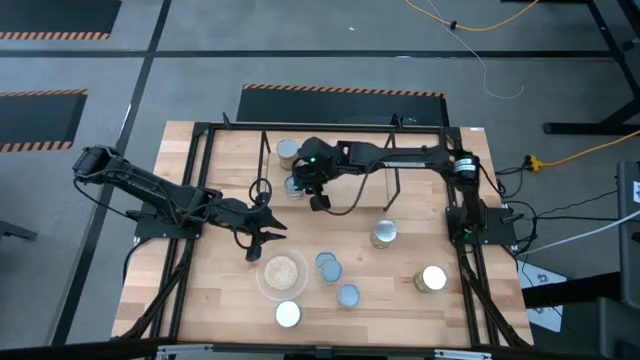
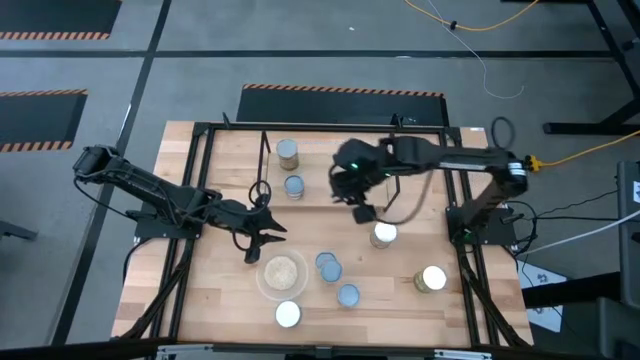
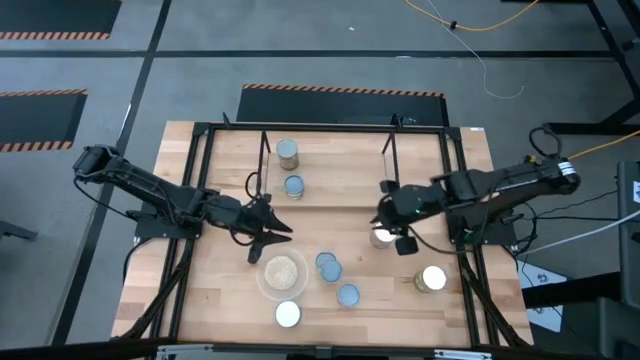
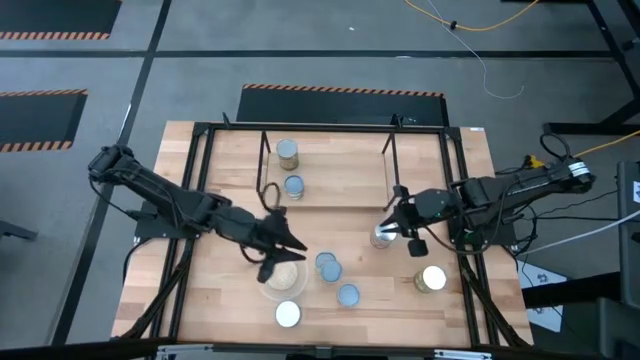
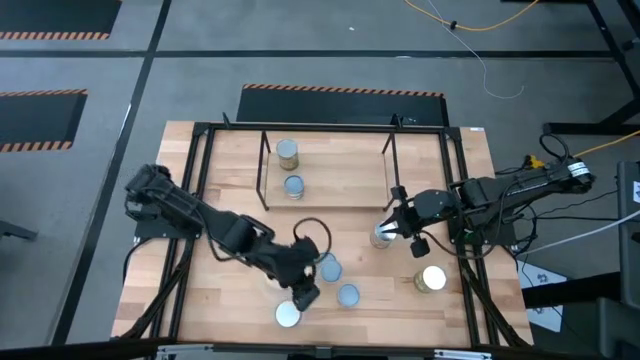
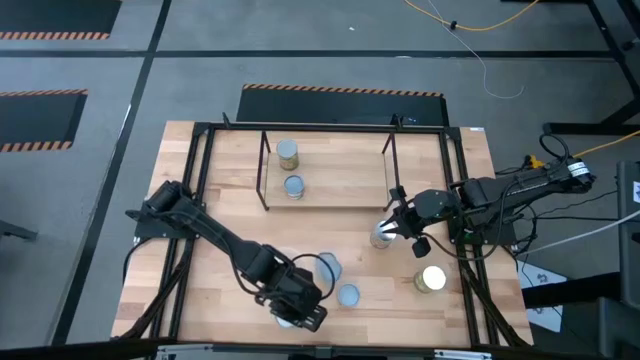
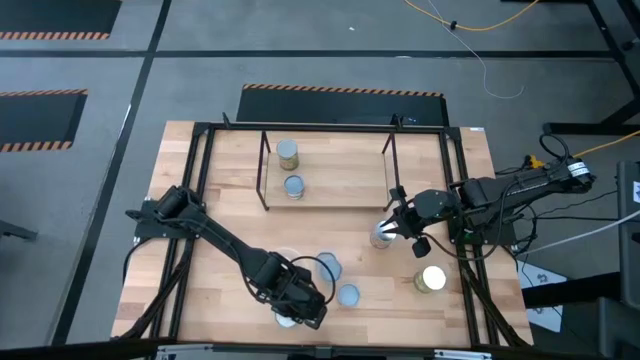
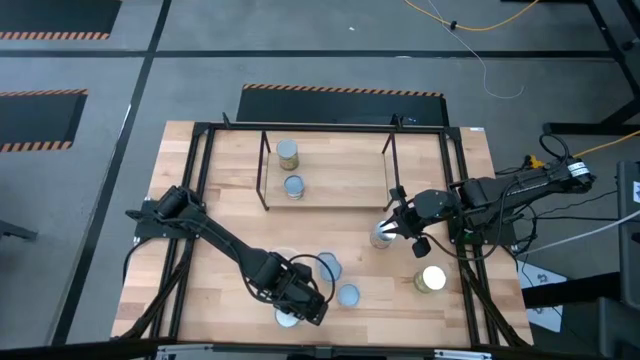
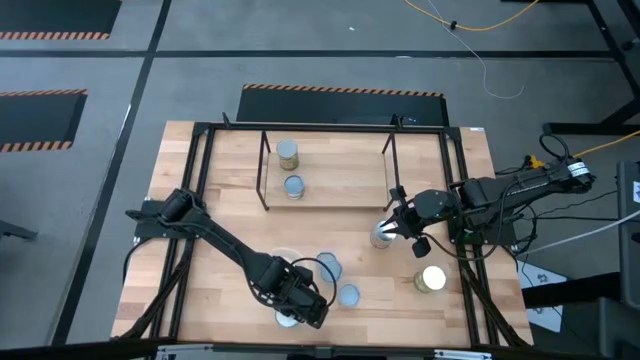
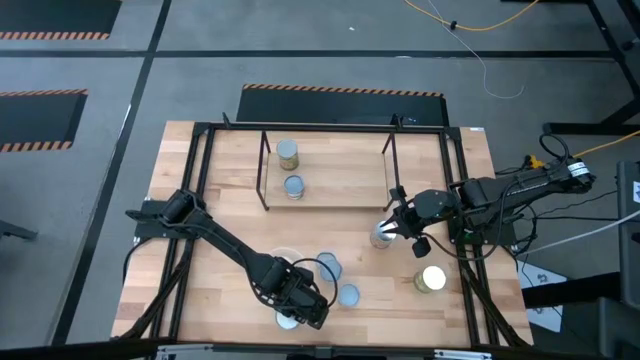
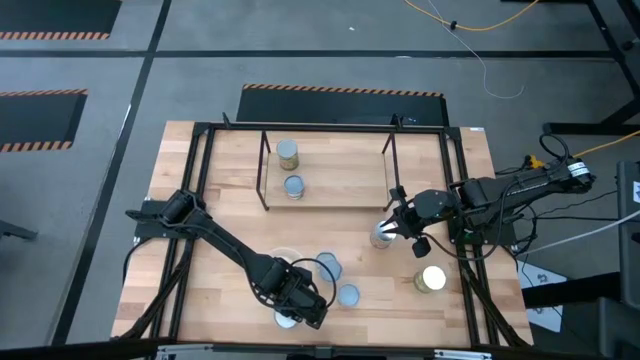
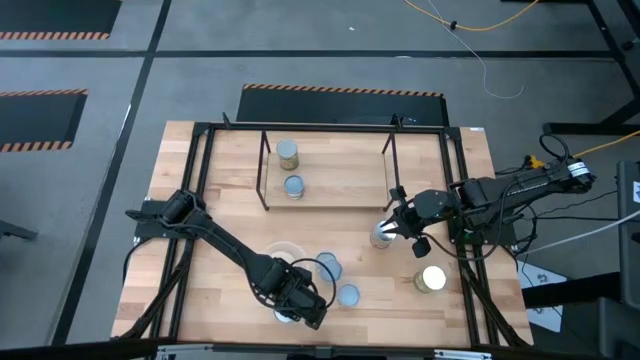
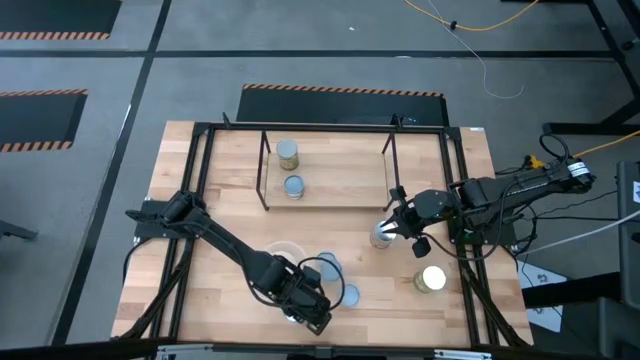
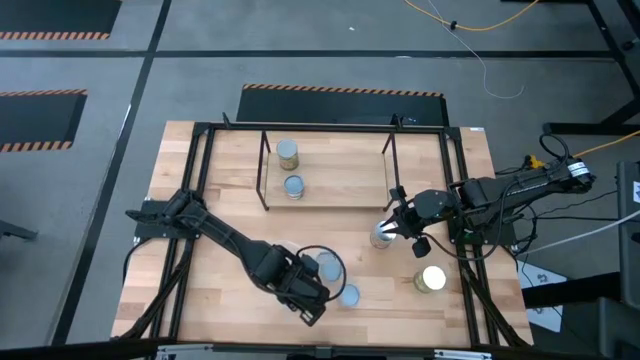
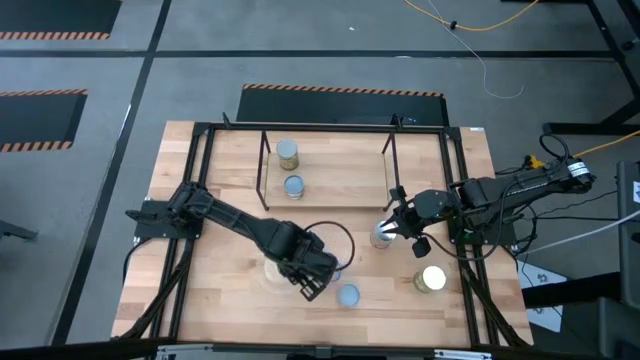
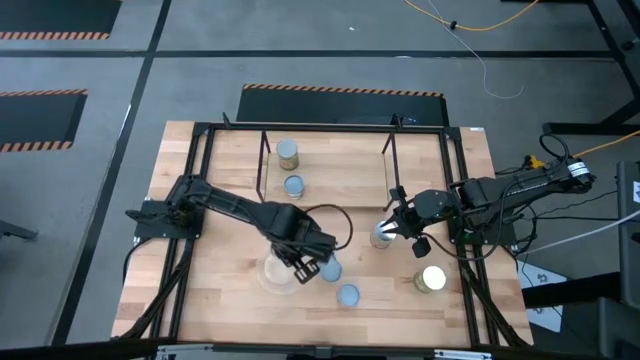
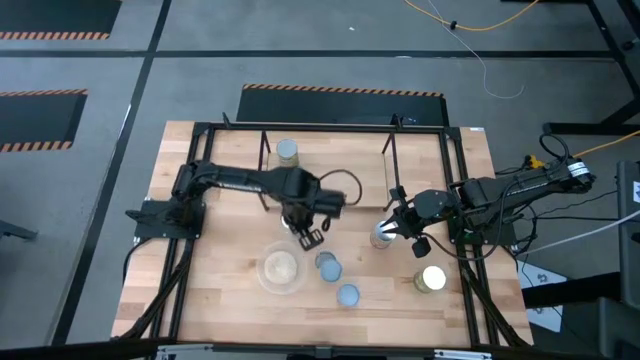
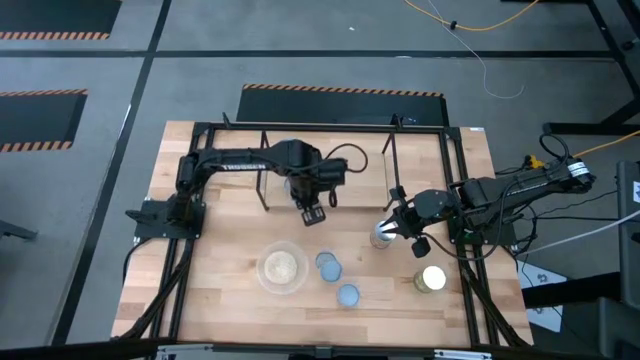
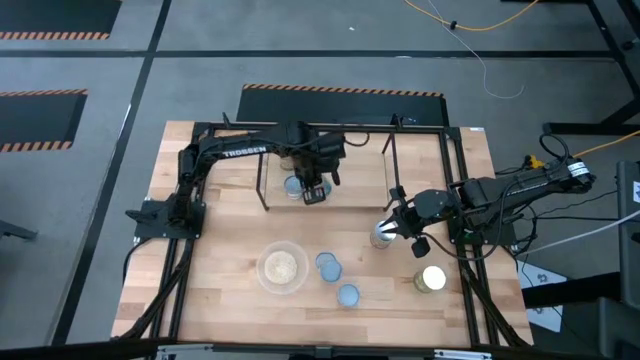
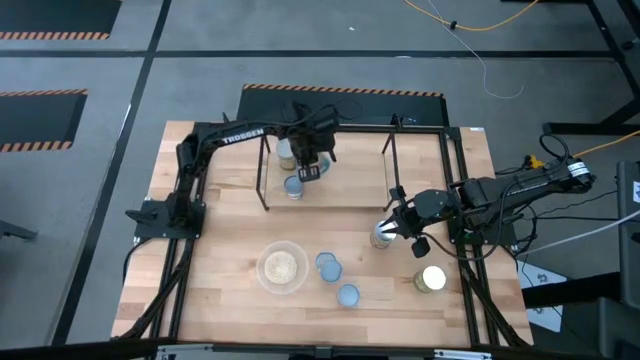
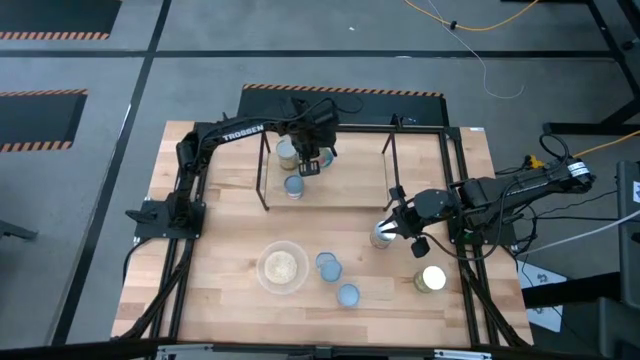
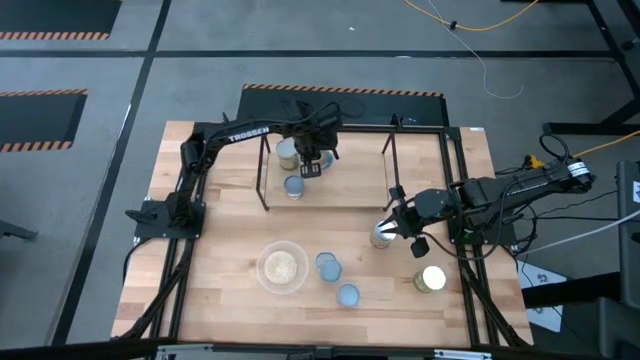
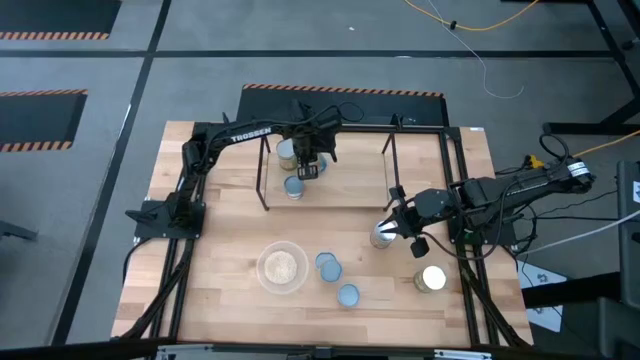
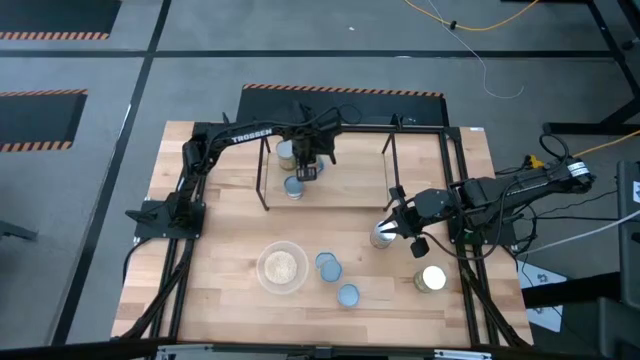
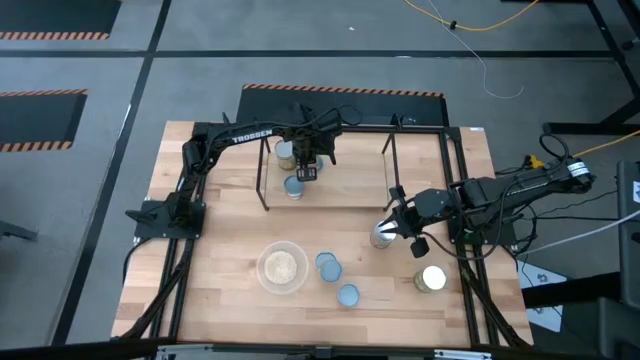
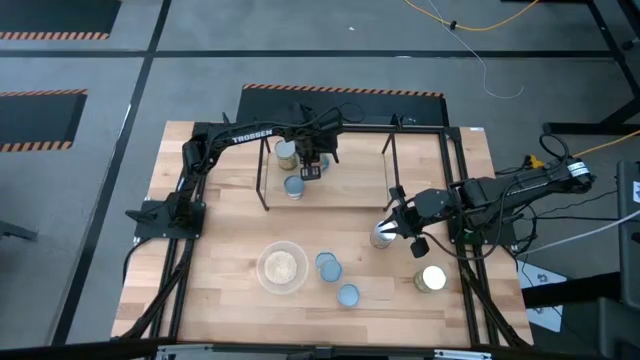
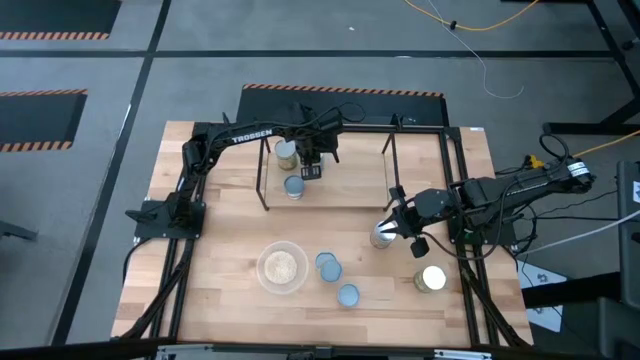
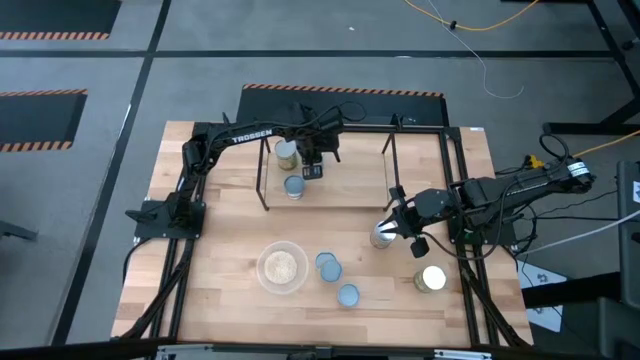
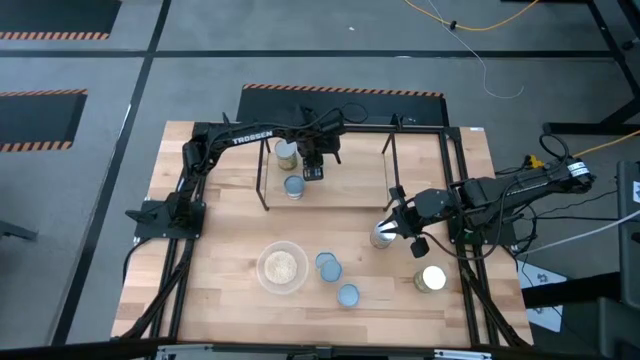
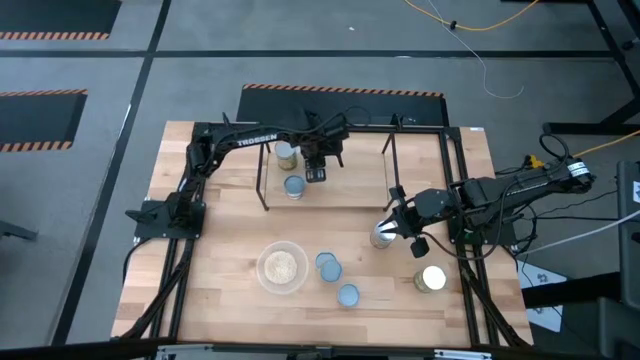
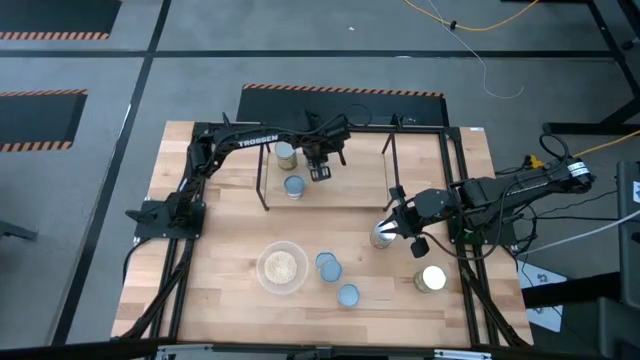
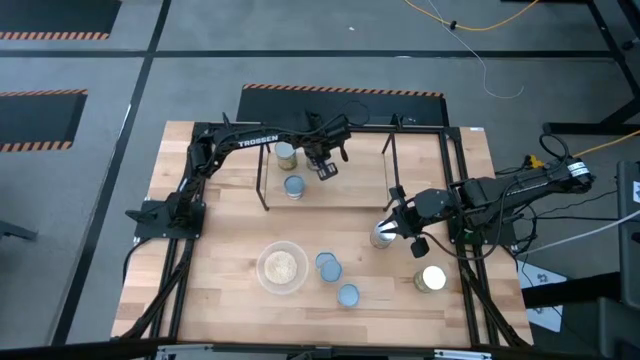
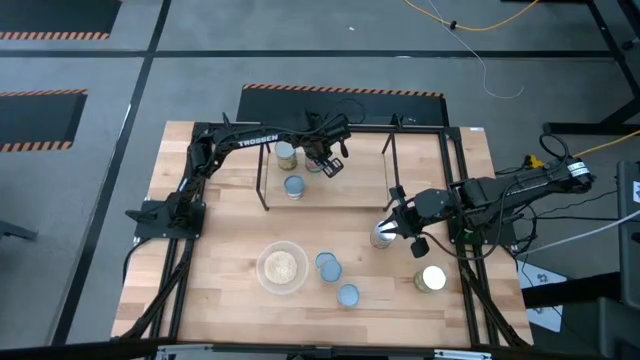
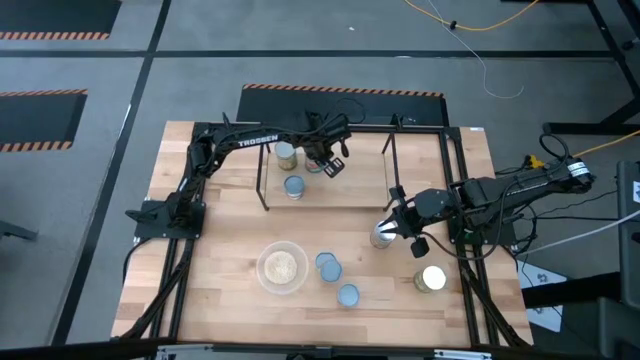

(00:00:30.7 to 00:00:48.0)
Task: Pick and place cans onto a shelf
Put the canned tomatoes on the shelf

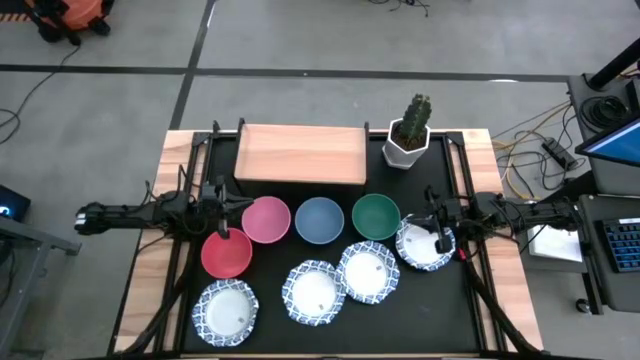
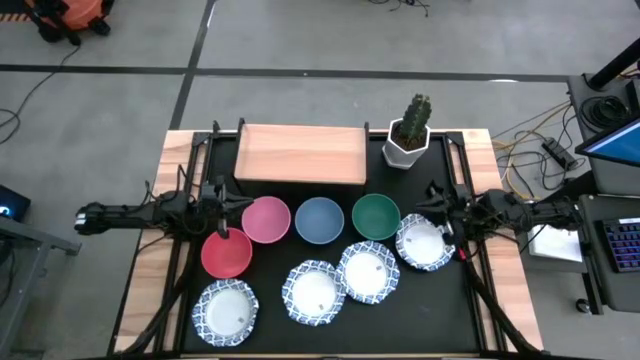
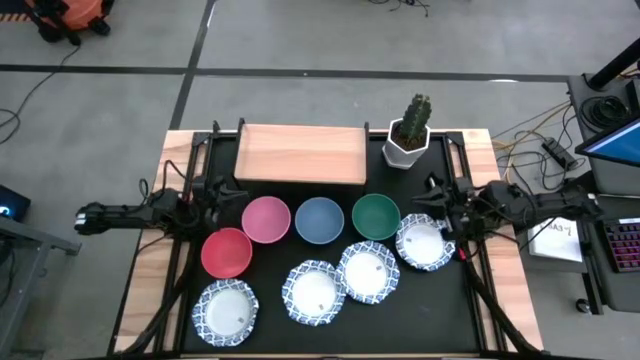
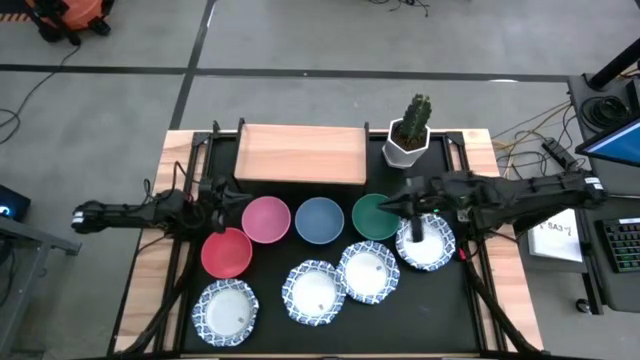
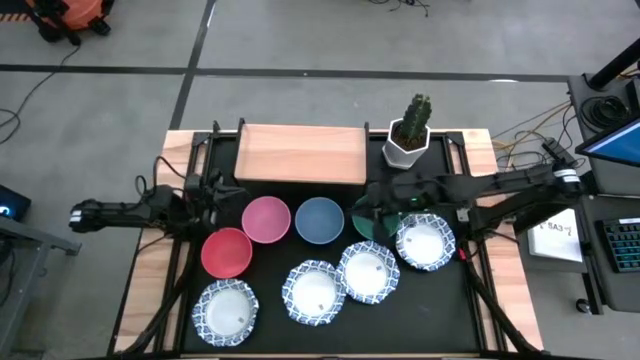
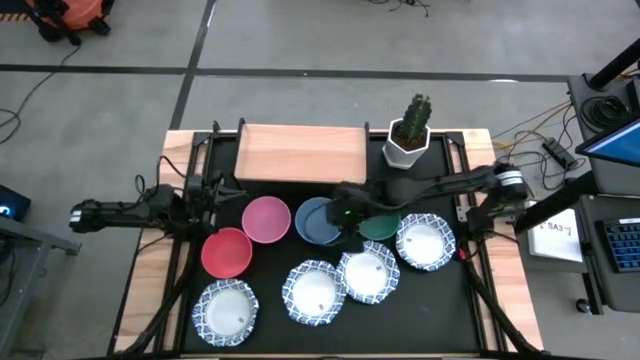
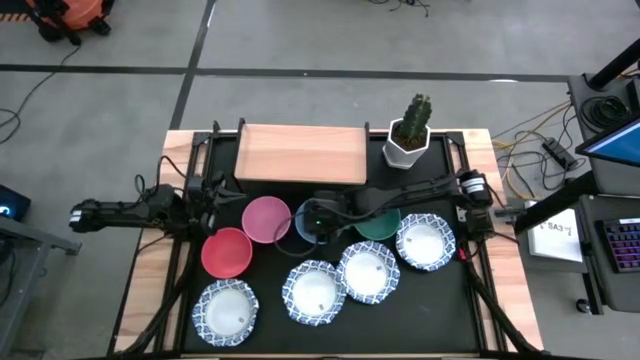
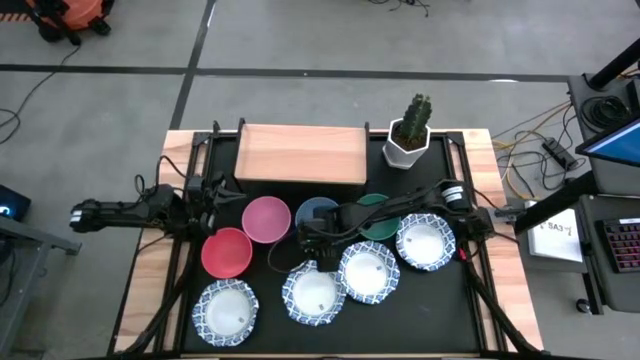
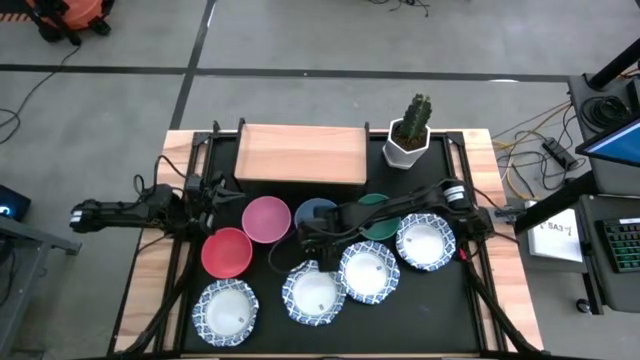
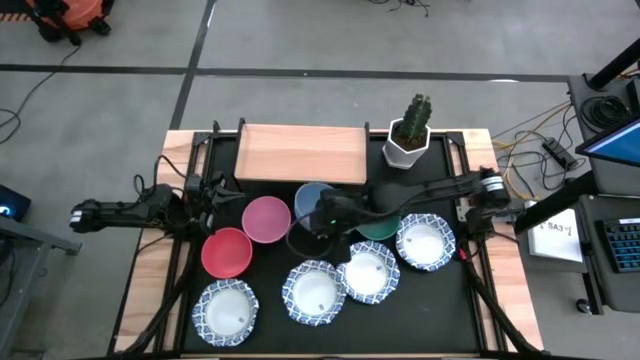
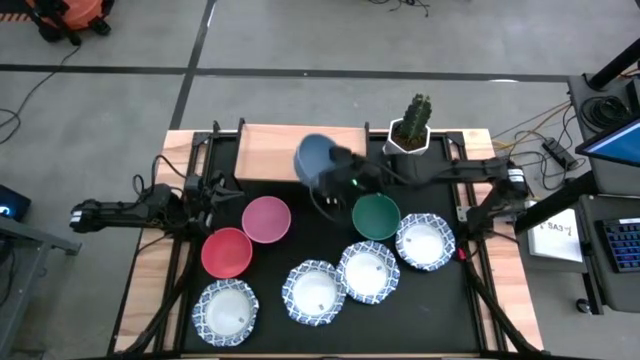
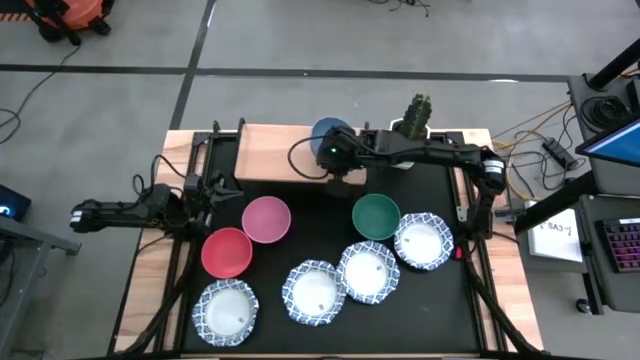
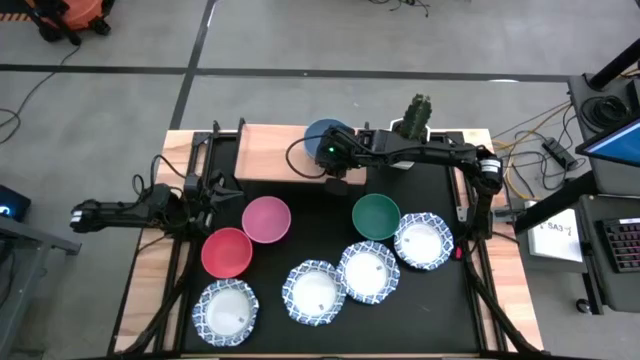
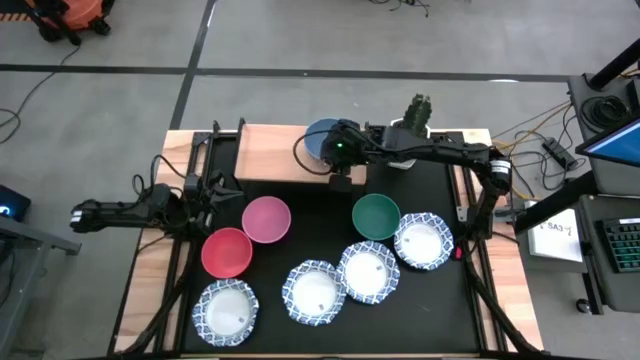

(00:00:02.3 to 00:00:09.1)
Task: Place and stack bowls onto a shelf
Put the blue bowl on the shelf
